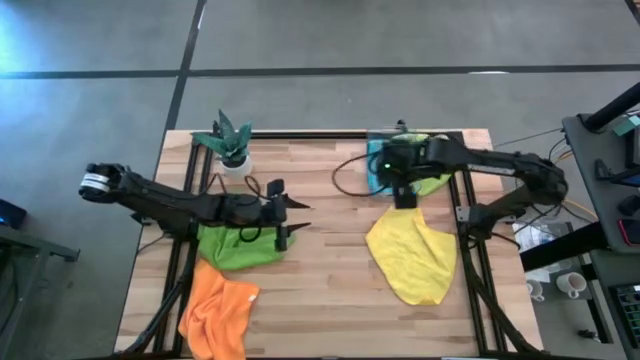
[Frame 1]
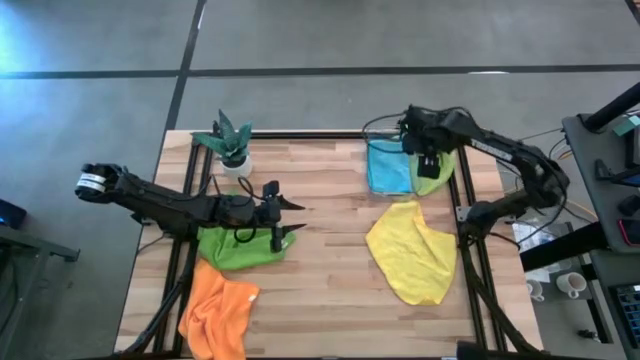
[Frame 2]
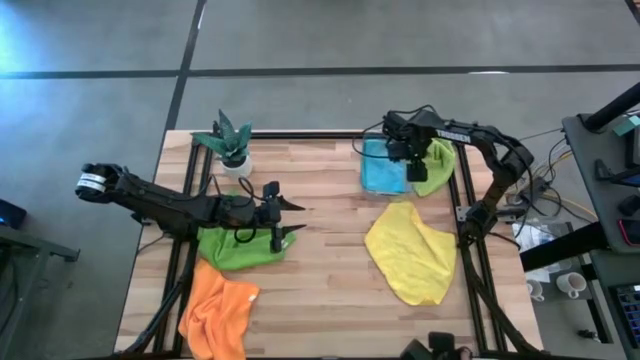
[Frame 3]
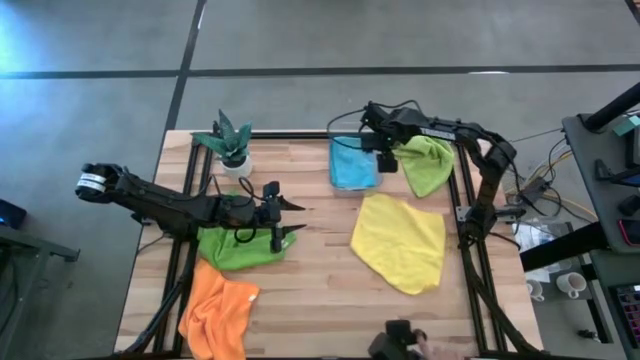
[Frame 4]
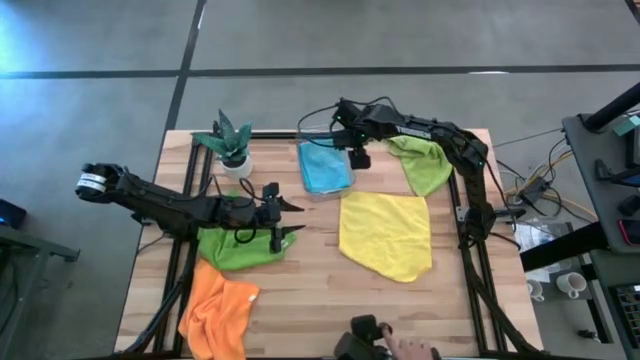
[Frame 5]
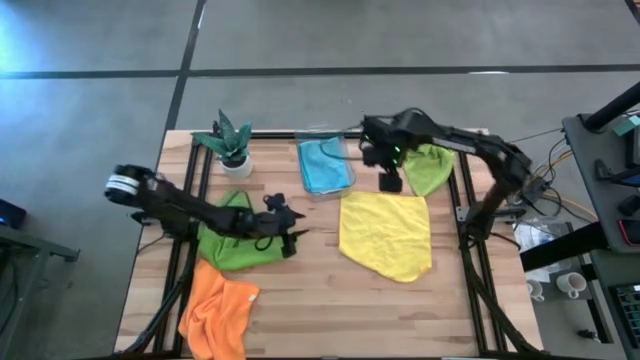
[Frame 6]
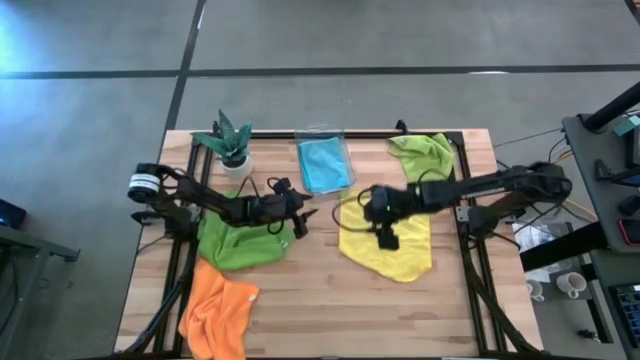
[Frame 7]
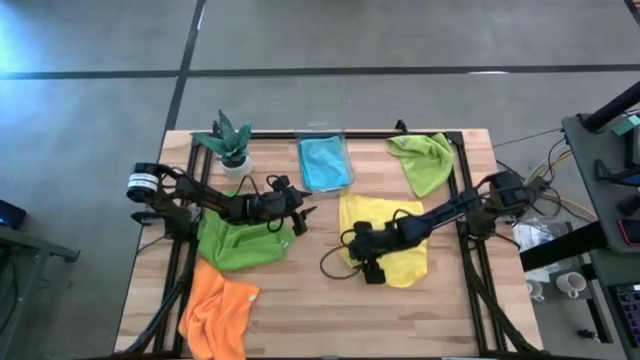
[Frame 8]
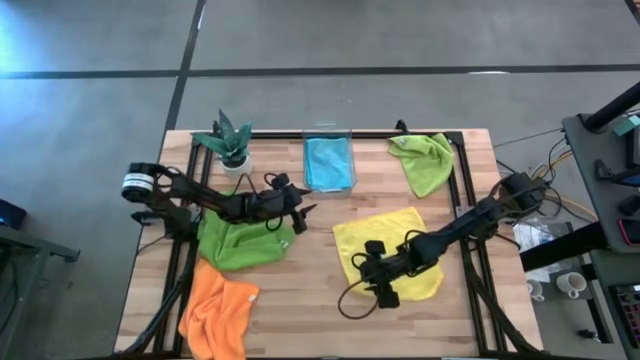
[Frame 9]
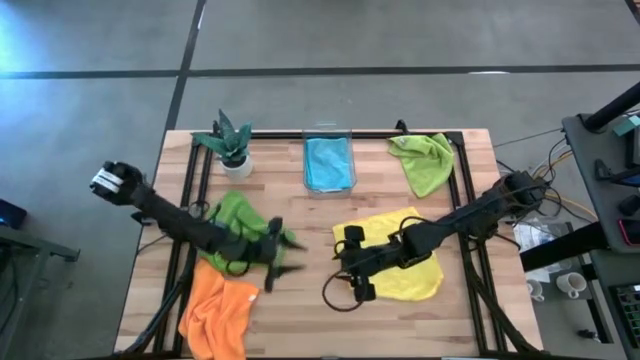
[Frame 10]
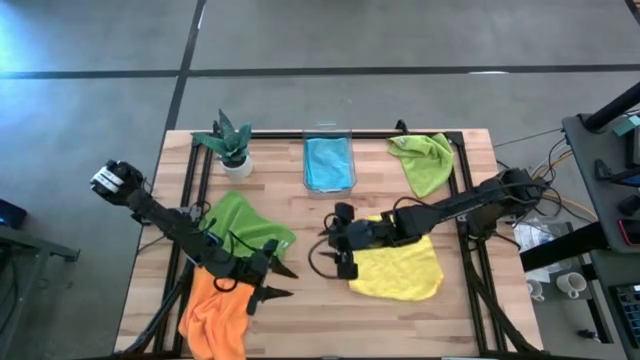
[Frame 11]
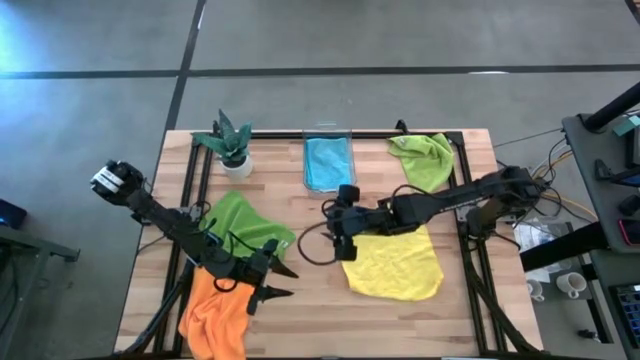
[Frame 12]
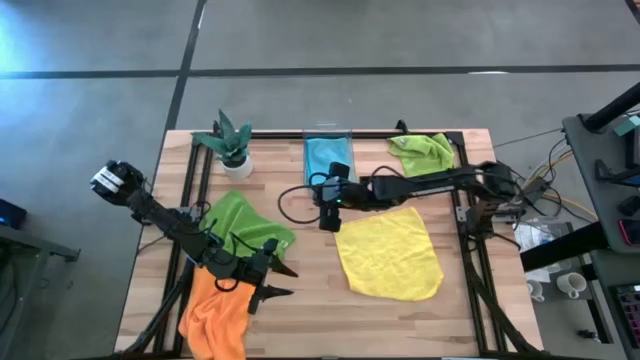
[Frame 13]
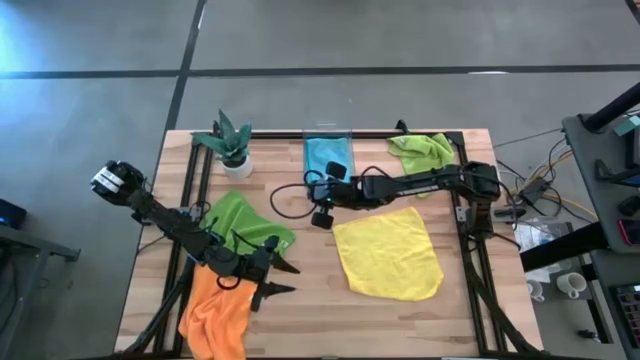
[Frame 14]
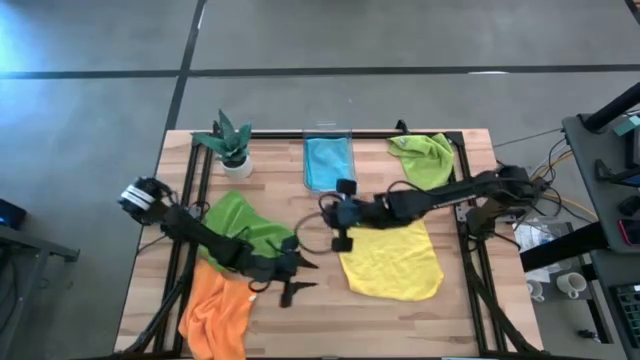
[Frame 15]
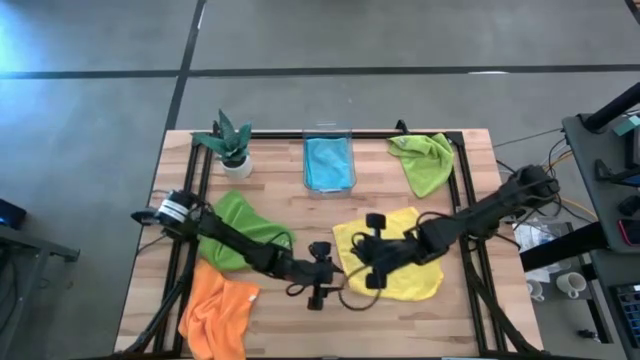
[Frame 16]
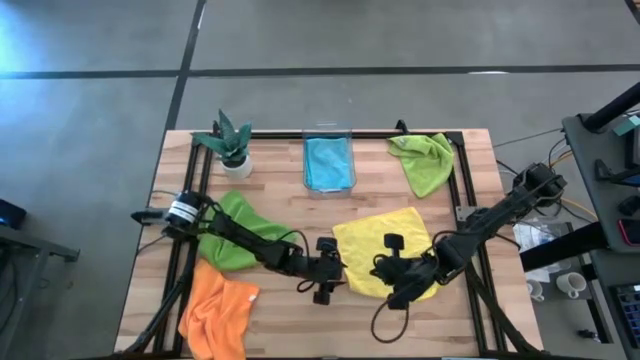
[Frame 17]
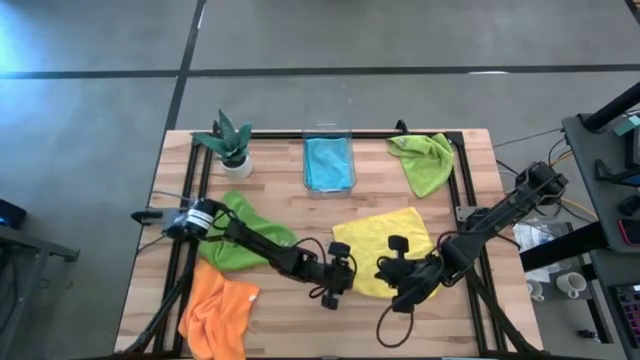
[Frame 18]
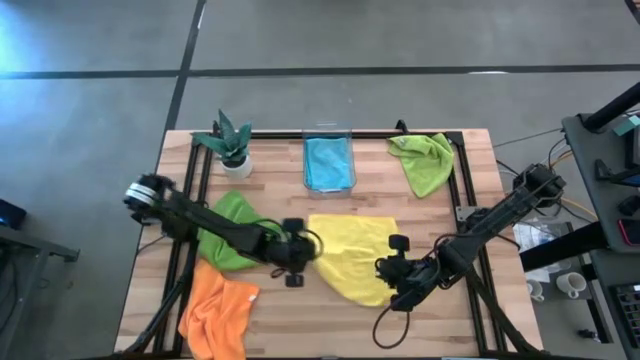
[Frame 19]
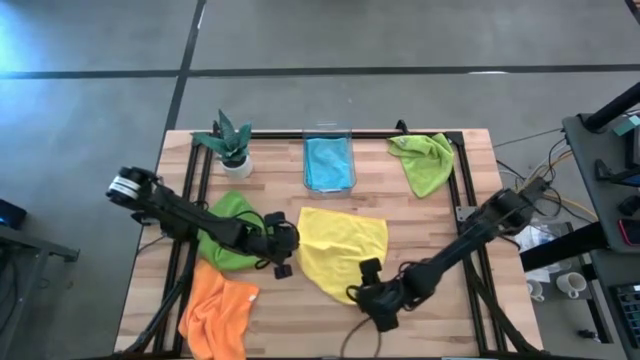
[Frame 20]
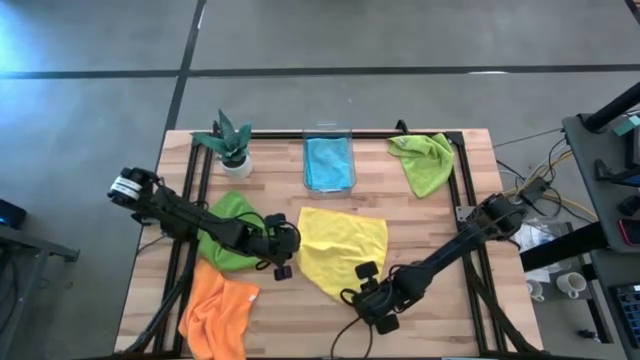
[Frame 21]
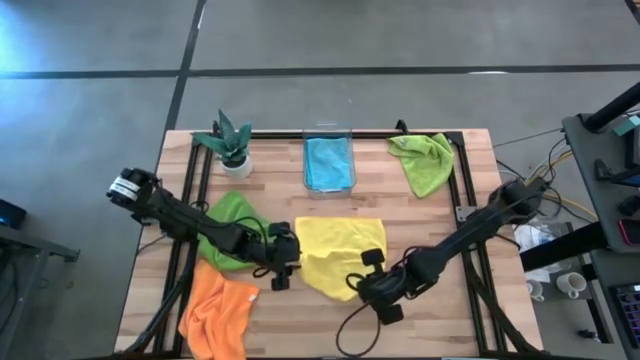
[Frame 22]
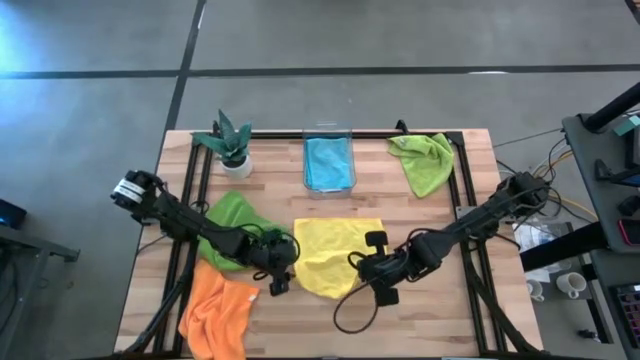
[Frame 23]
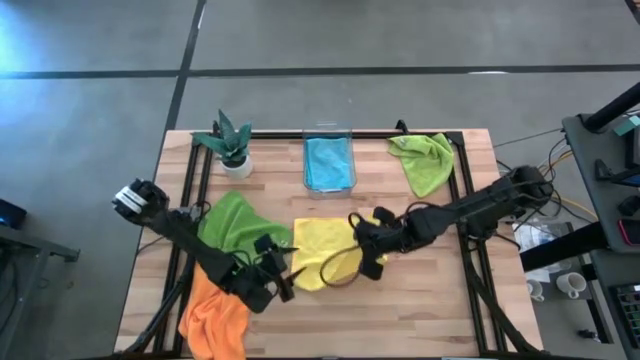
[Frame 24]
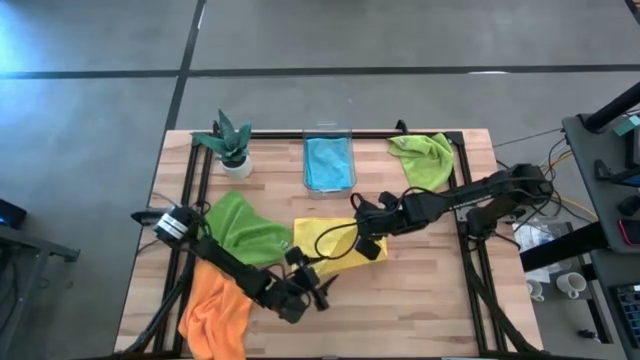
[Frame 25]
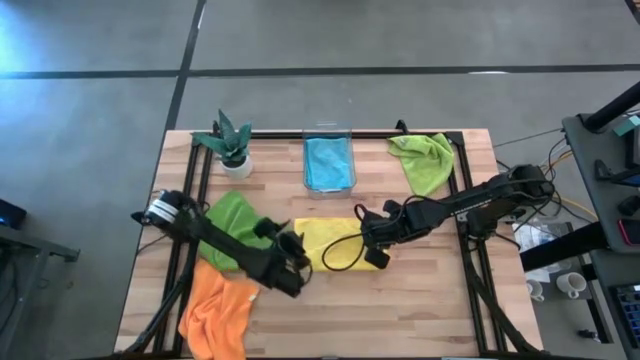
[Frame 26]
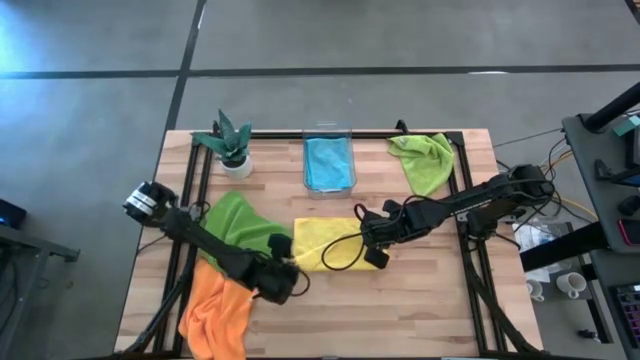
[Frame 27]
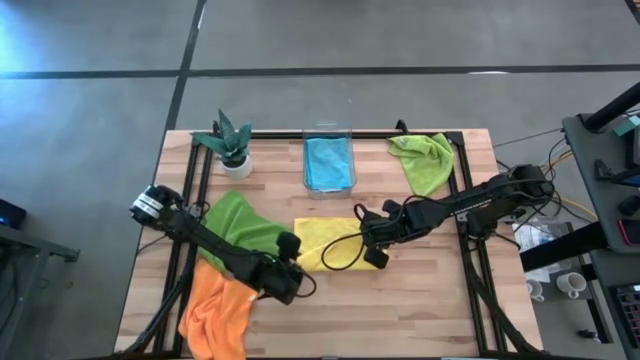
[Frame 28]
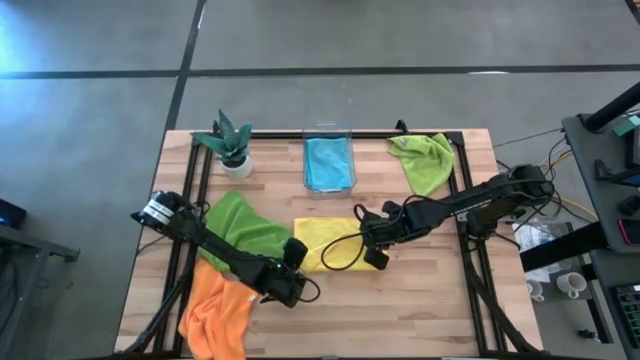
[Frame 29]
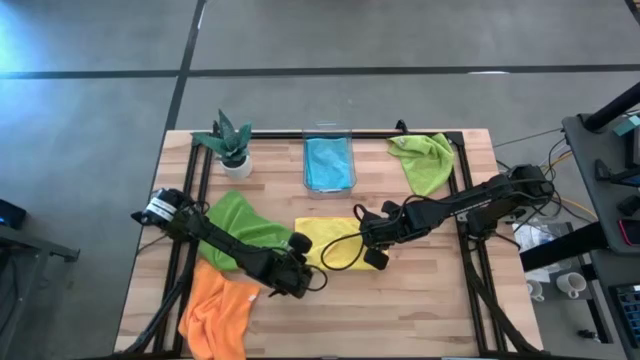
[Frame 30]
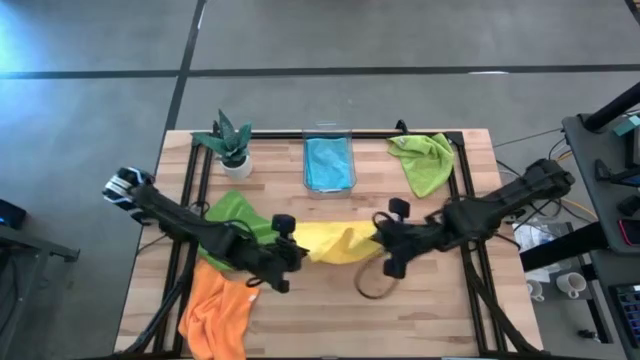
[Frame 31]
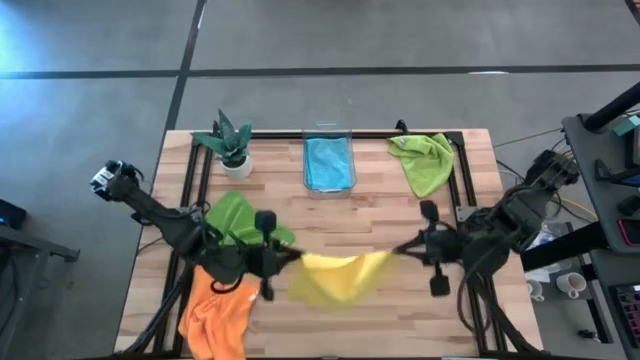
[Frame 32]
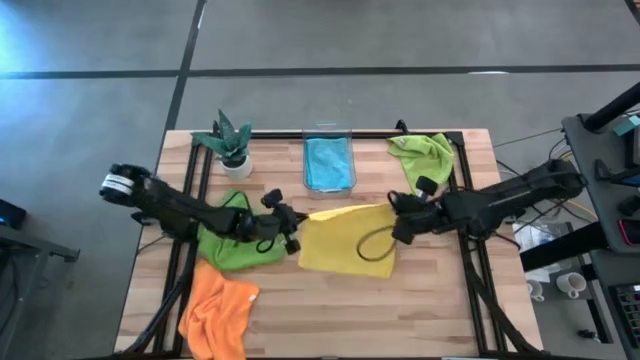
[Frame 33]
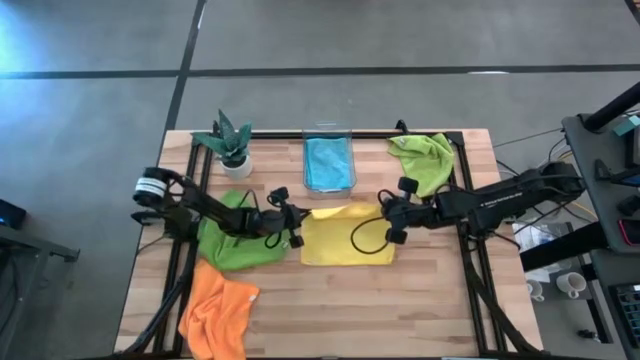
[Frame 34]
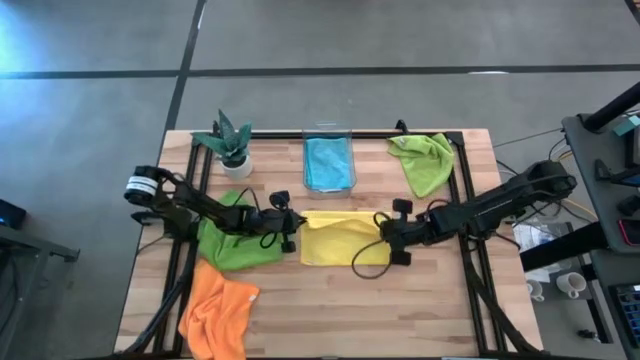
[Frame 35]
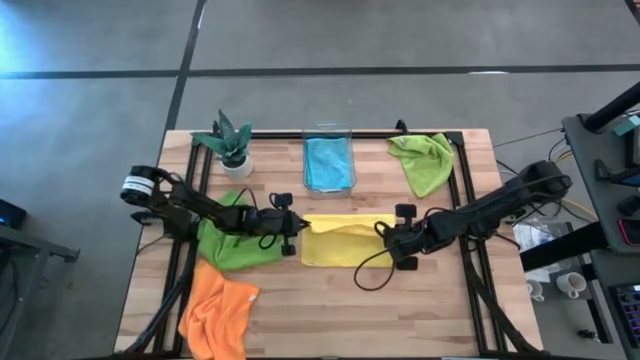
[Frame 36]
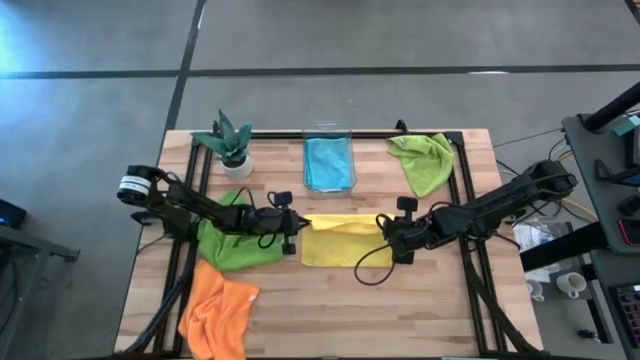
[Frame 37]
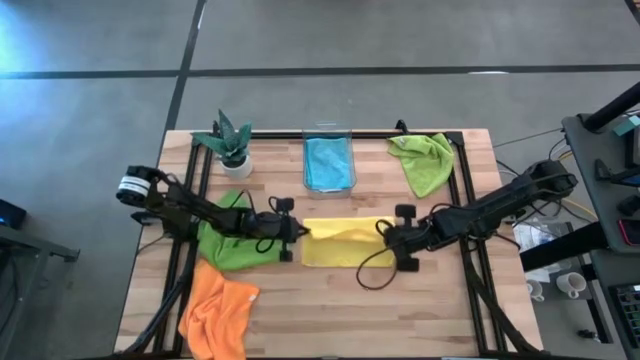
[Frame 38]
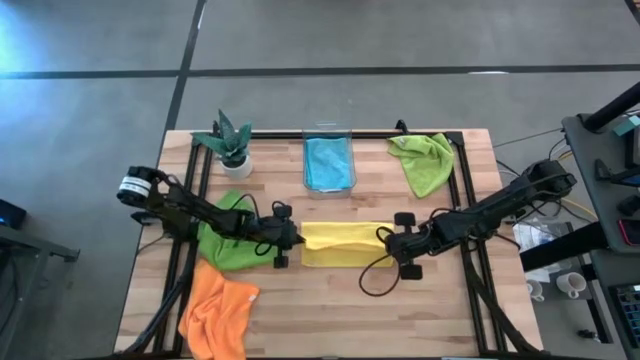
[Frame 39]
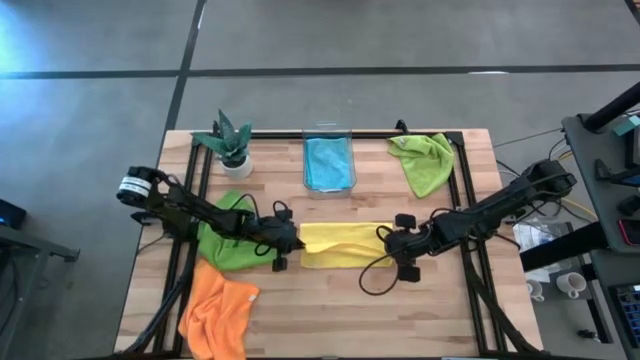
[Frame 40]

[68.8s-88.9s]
Task: Fold microfiber towels
Fold the yellow microfiber cloth
